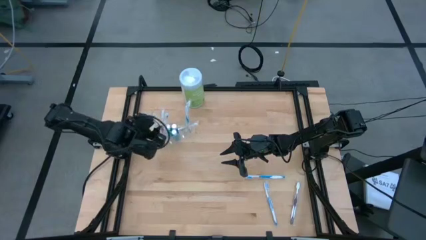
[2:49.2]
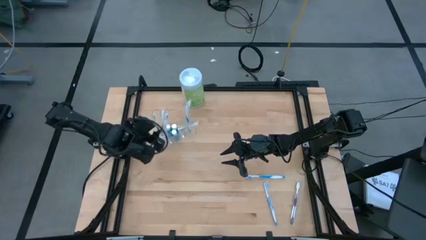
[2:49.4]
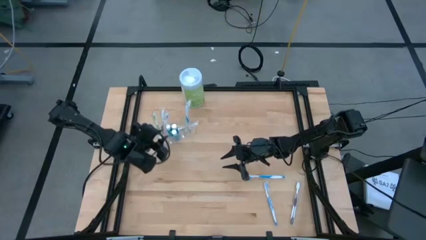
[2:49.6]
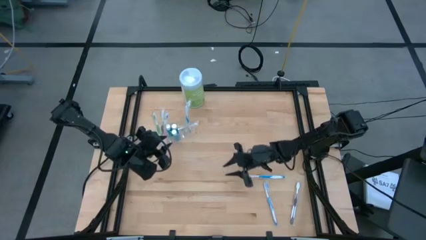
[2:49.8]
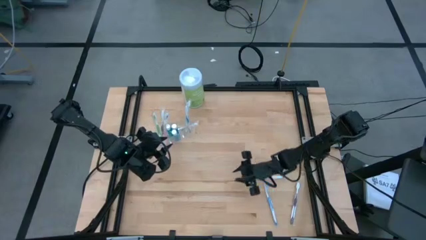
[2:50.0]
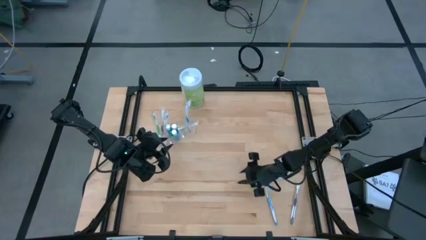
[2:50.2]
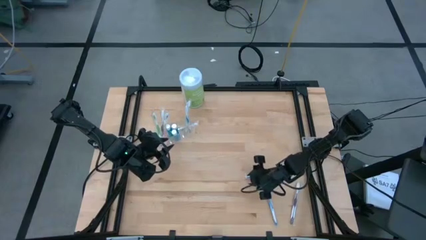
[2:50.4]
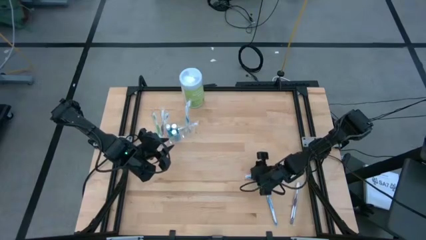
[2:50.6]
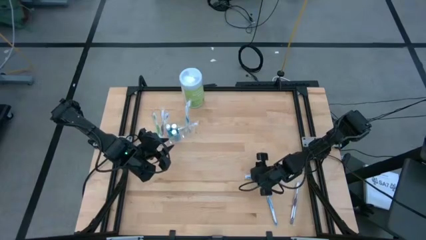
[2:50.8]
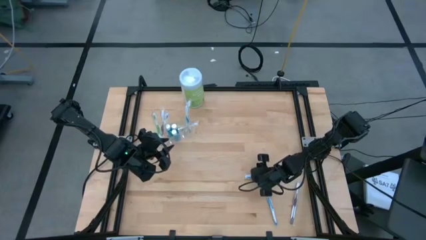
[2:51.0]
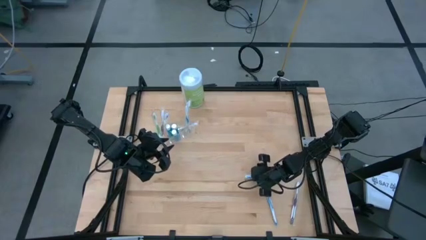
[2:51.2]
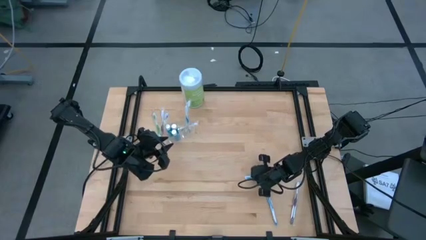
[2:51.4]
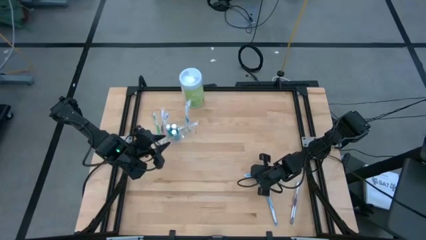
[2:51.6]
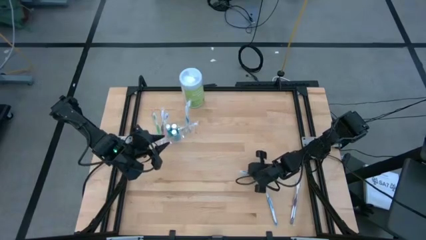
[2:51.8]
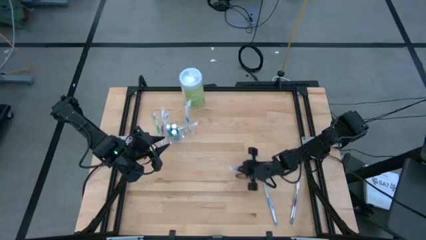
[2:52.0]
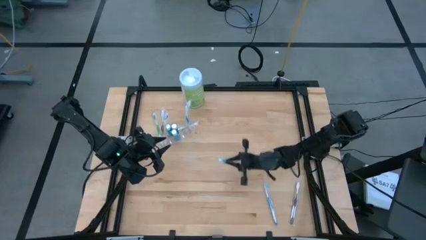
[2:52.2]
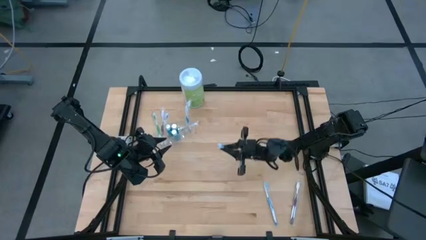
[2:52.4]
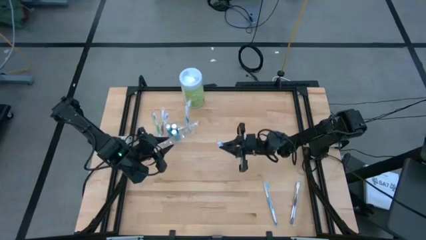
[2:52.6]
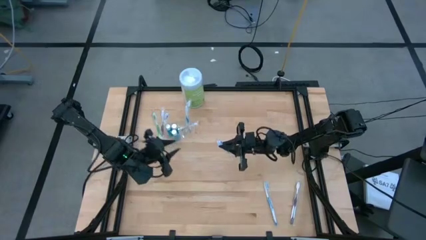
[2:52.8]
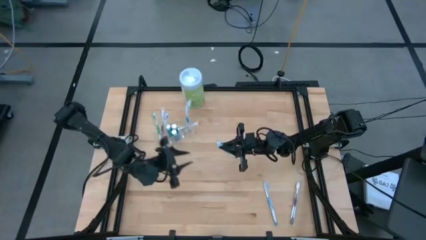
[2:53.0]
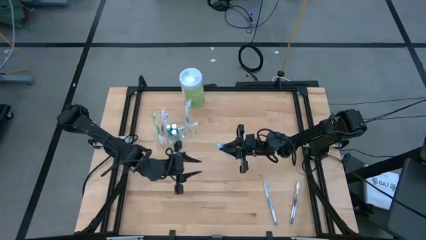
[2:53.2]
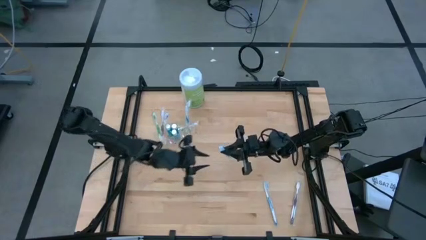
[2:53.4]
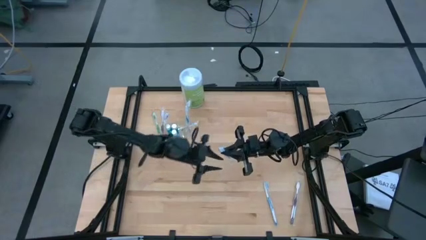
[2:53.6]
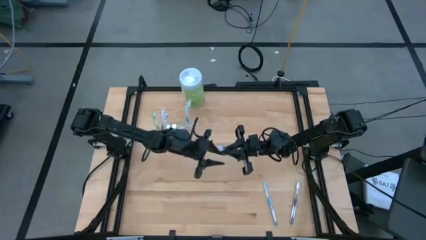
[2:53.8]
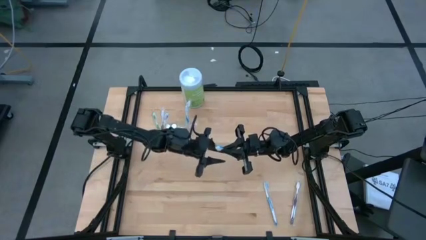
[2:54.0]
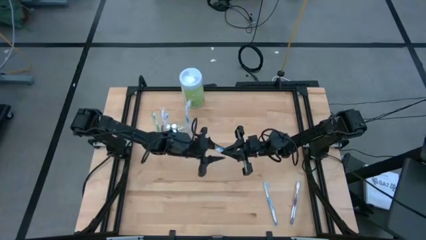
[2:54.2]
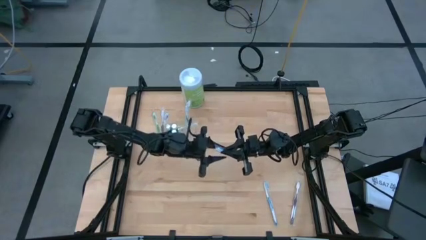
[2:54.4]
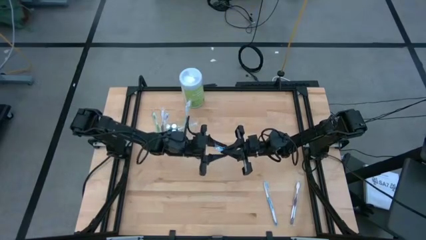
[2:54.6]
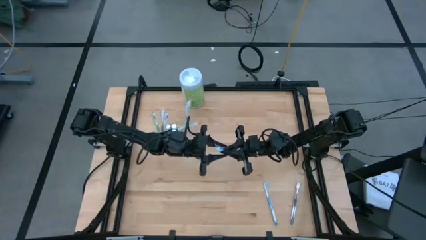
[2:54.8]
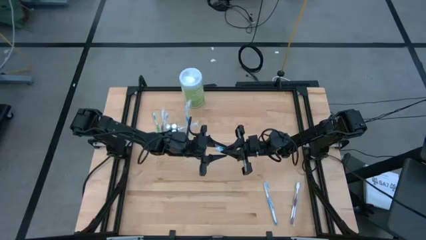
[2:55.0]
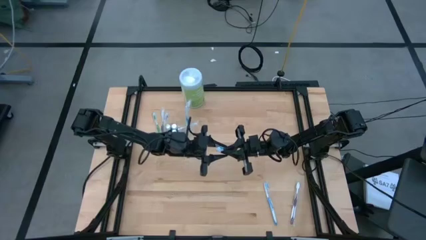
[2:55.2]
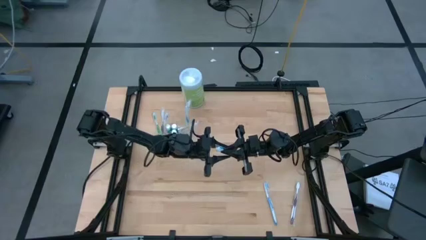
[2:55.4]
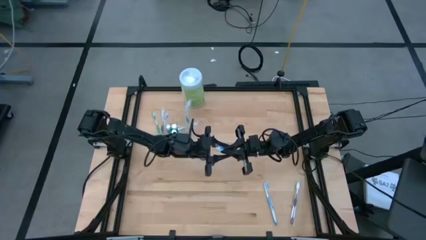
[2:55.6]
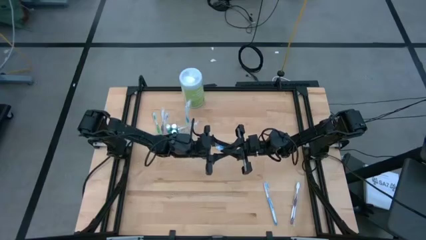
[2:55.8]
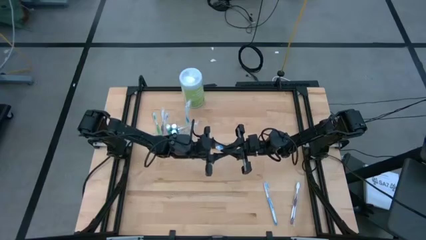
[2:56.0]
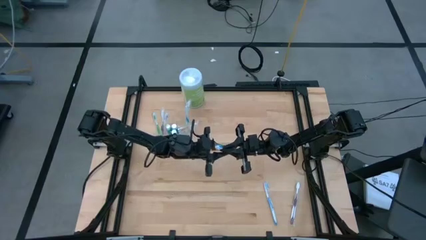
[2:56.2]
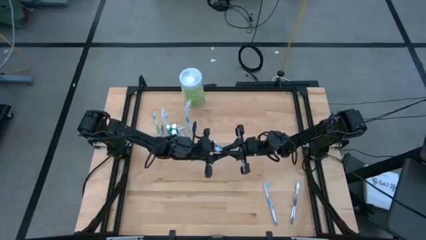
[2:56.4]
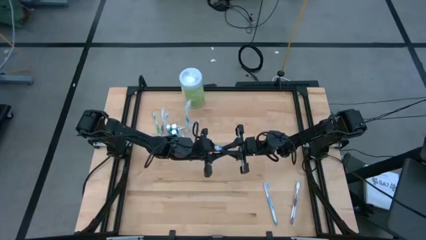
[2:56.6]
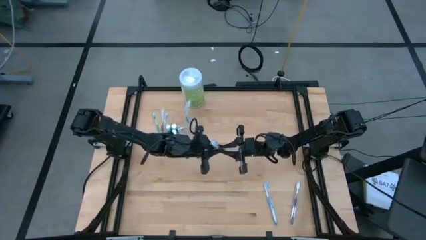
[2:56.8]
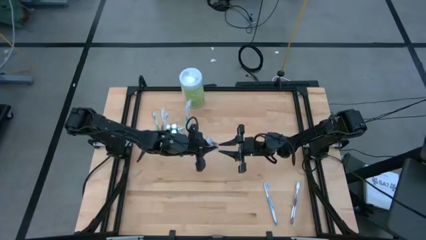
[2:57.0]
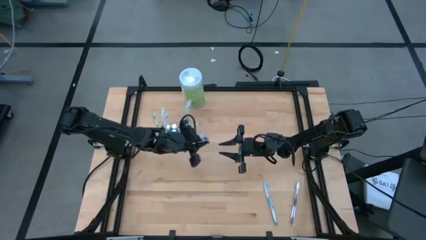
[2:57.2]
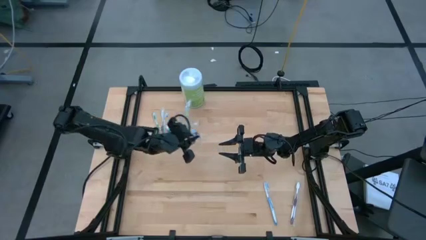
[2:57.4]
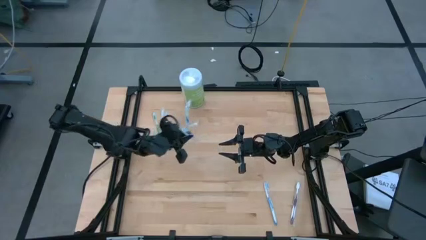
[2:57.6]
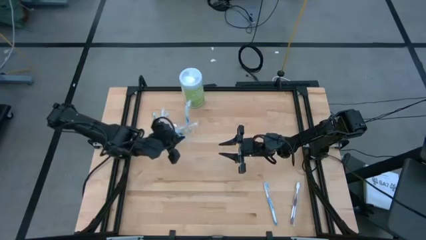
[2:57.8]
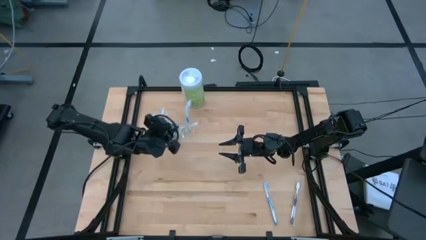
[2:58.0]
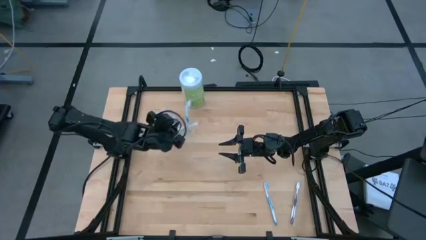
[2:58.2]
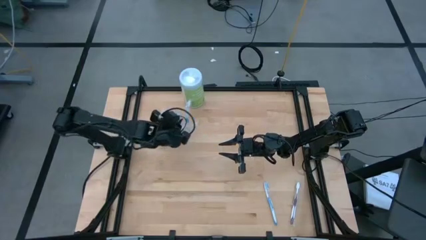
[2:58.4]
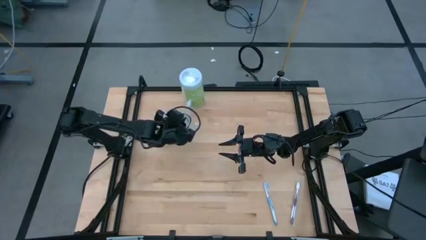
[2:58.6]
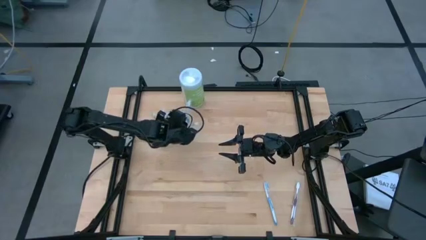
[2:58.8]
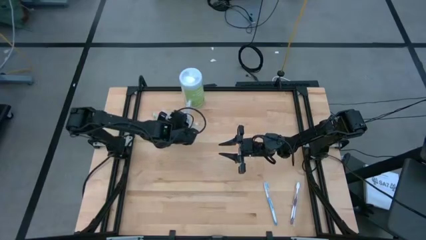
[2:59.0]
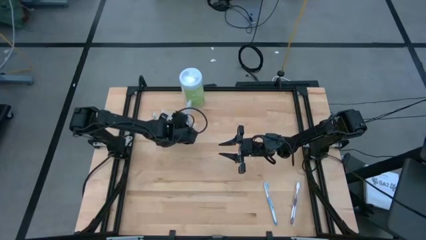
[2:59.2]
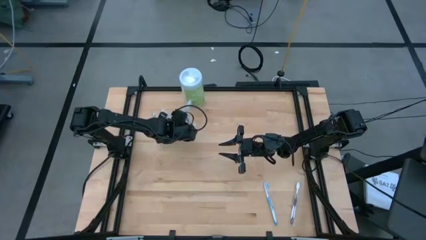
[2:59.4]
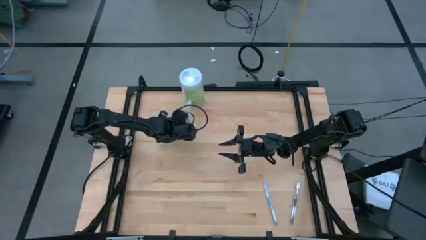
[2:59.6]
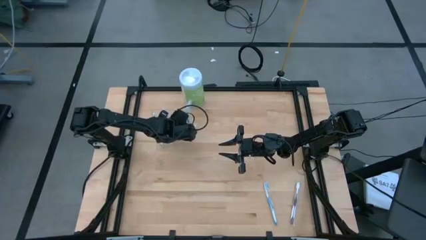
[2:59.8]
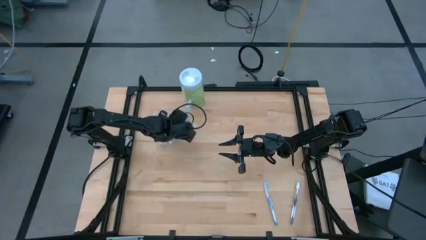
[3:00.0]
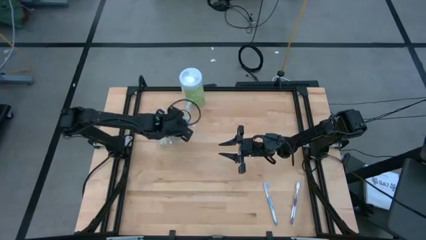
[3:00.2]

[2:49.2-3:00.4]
Task: Pick & Place toothbrushing station
Put the left blue toothbrush into the transparent organizer

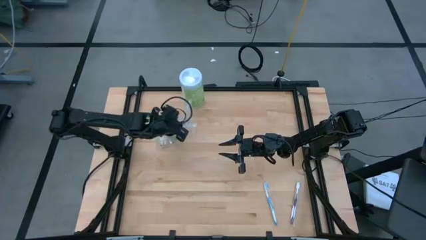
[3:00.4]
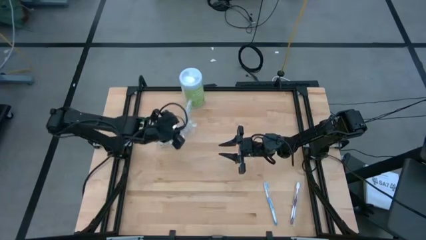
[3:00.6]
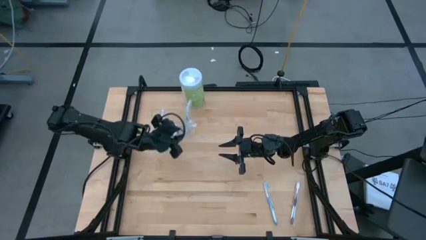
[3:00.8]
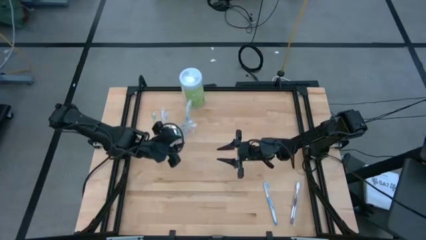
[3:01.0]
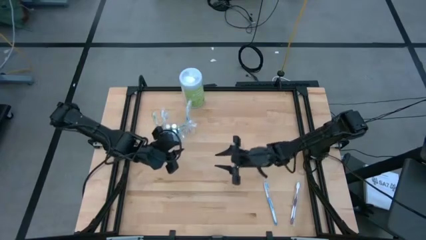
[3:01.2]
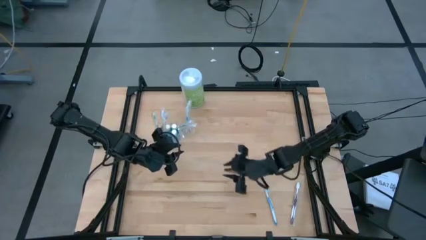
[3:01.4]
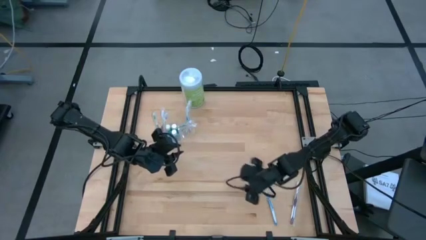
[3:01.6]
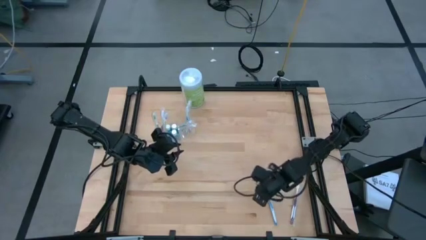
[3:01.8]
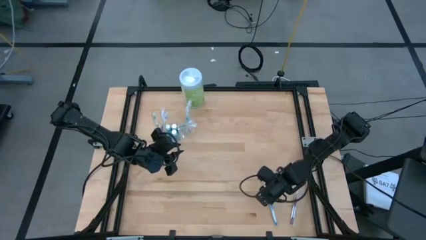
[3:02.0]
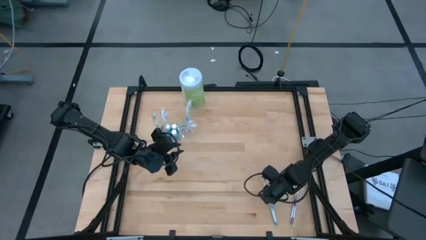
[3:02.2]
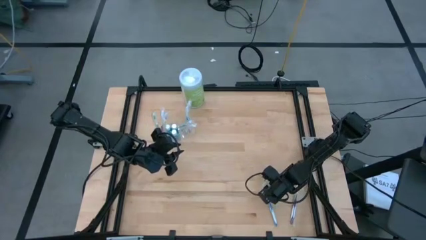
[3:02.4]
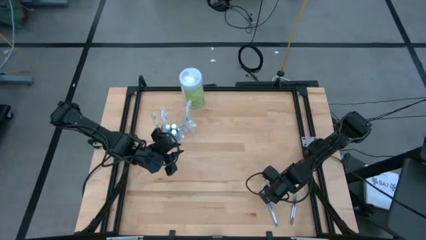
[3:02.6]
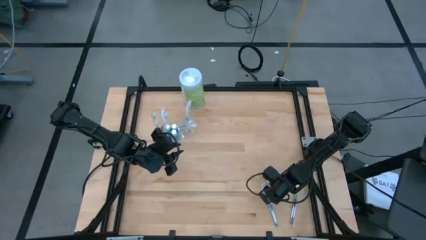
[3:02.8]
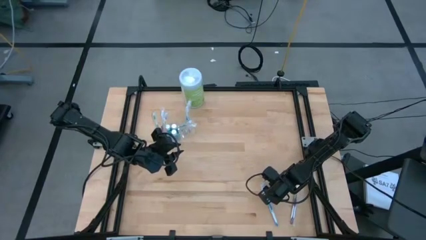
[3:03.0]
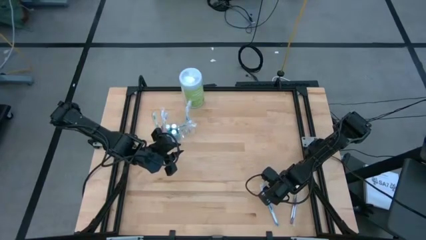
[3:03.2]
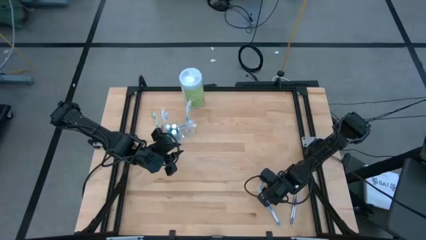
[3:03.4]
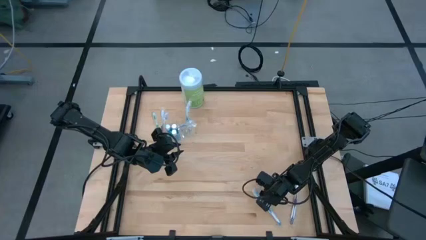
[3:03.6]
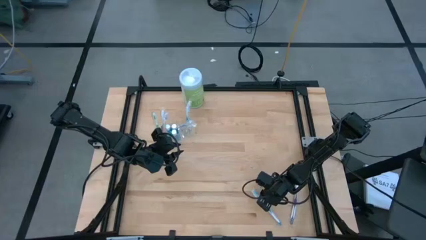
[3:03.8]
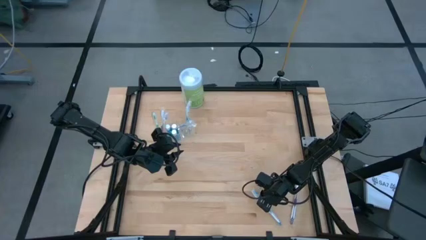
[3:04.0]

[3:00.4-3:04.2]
Put the blue toothbrush into the transparent organizer

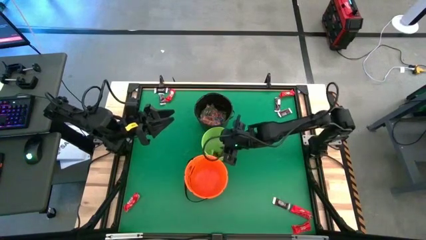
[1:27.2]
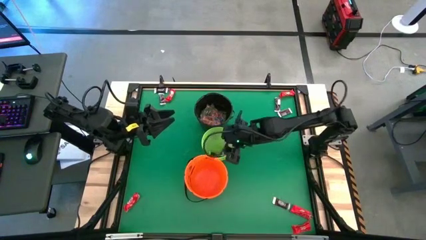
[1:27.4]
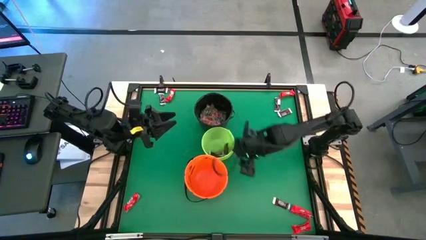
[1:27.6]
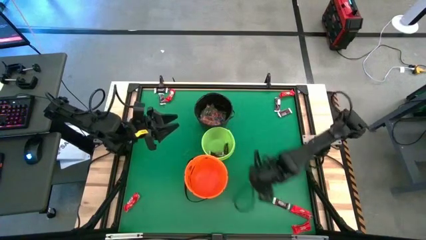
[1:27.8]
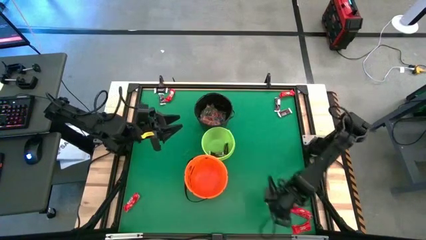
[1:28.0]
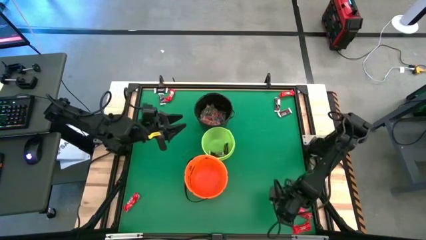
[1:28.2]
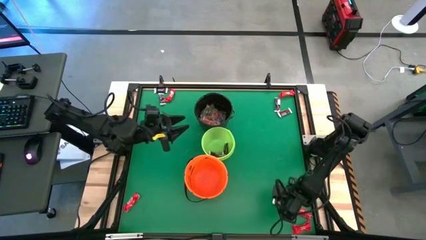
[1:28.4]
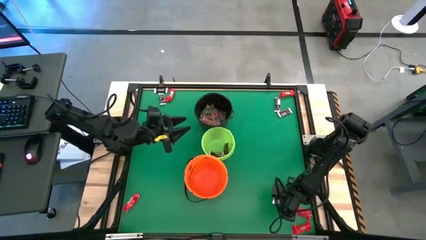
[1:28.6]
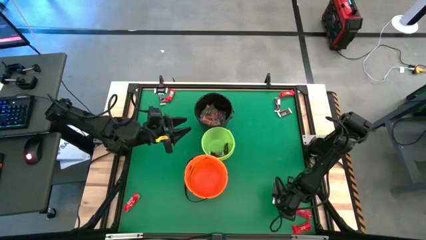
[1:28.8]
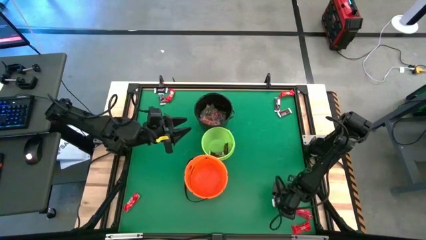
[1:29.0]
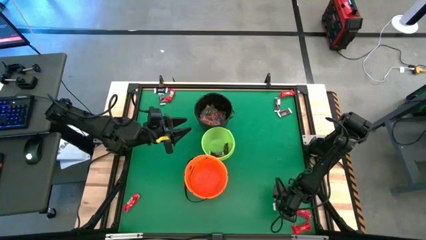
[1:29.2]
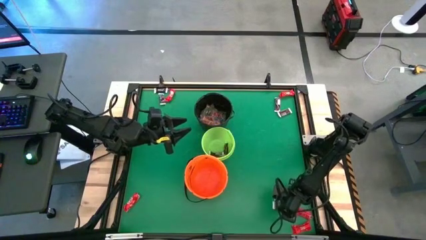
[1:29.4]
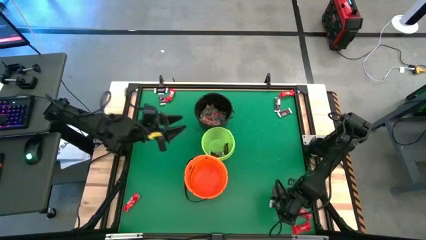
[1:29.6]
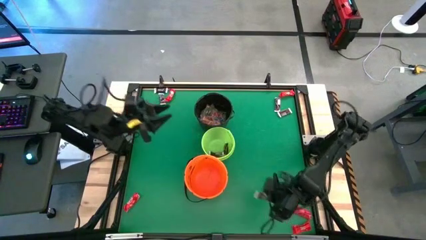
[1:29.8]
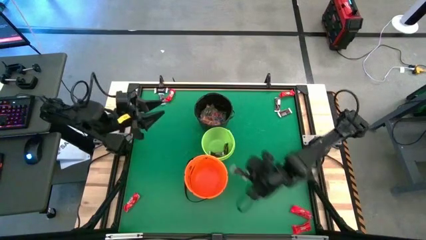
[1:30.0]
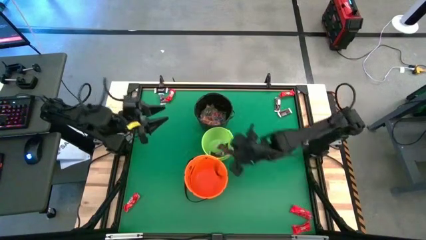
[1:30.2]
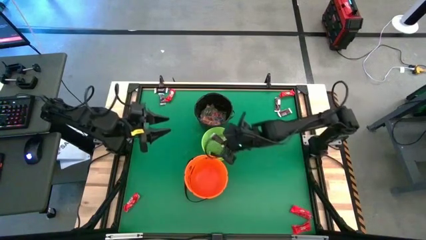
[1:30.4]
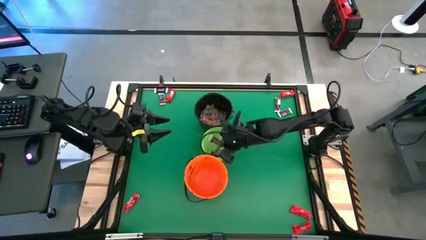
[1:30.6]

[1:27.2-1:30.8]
Task: Sort candy by brand, put in halloween buckets
Put the brown chocolate bar into the green bucket
